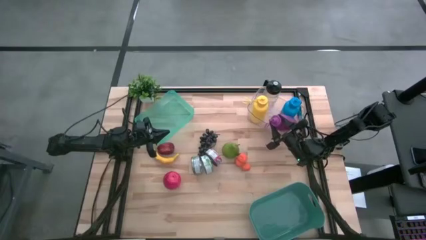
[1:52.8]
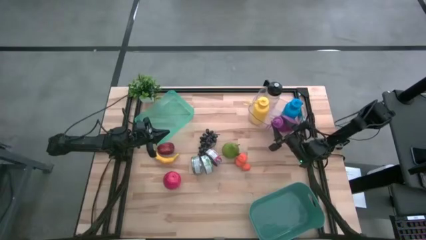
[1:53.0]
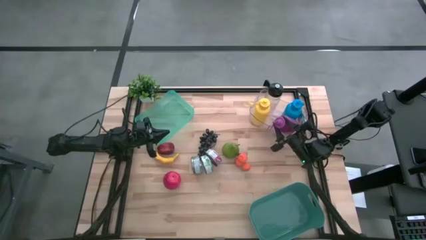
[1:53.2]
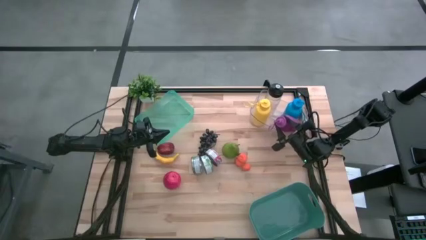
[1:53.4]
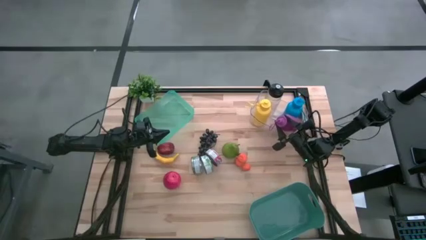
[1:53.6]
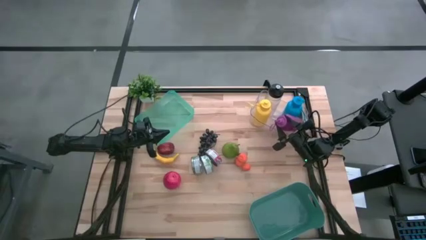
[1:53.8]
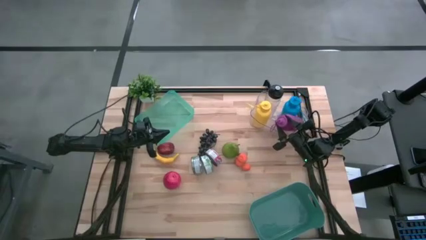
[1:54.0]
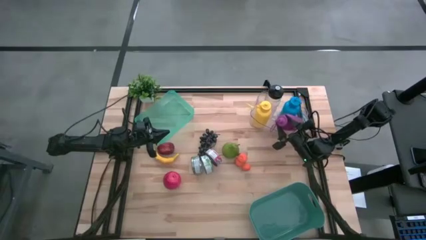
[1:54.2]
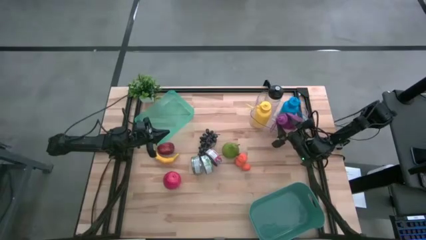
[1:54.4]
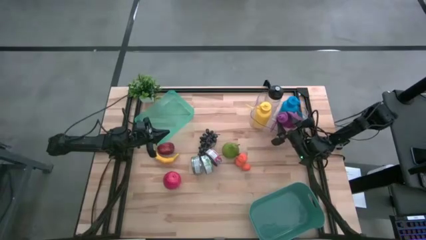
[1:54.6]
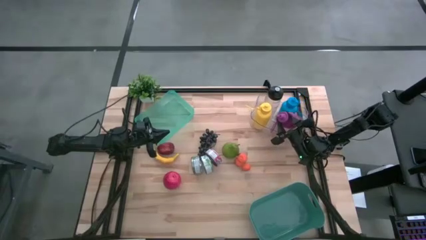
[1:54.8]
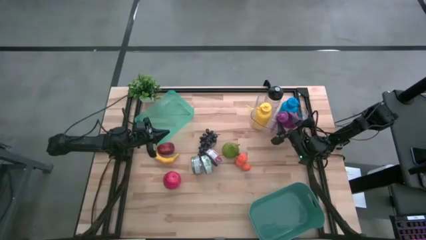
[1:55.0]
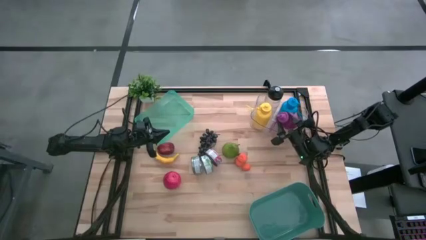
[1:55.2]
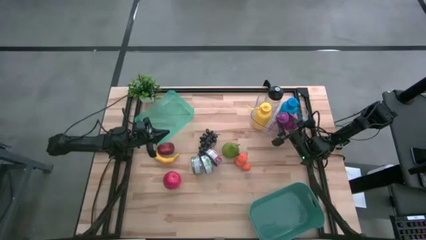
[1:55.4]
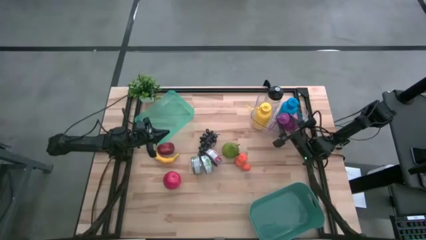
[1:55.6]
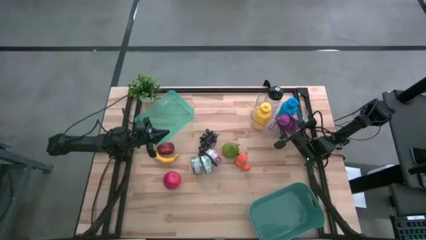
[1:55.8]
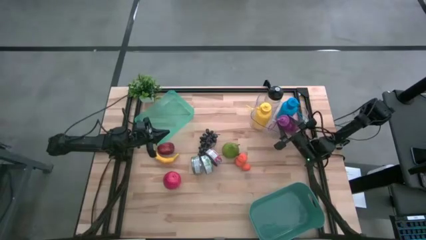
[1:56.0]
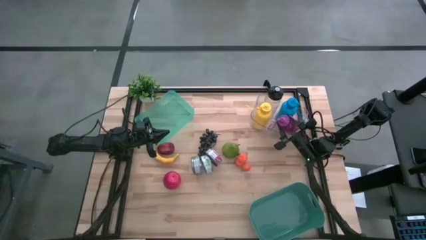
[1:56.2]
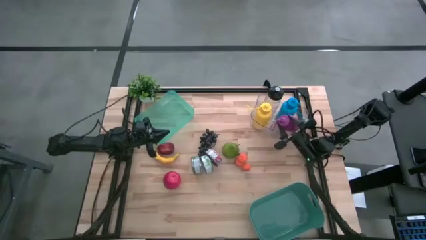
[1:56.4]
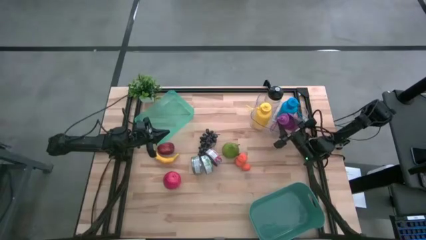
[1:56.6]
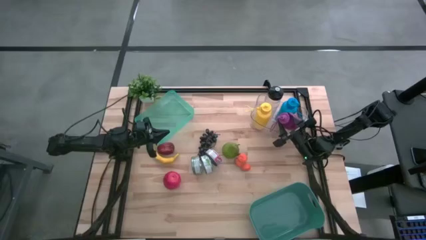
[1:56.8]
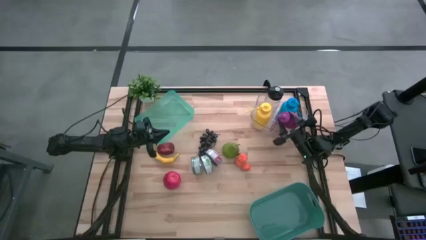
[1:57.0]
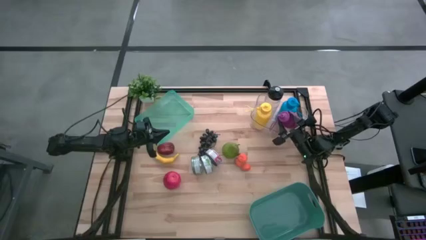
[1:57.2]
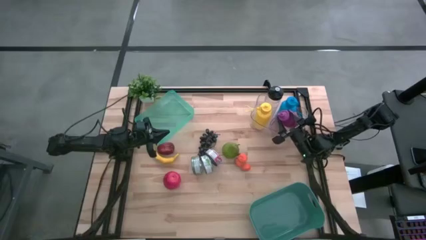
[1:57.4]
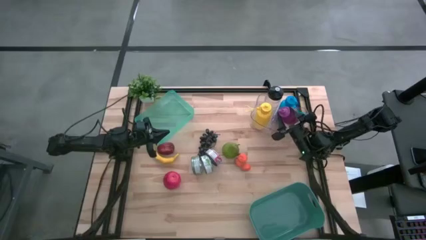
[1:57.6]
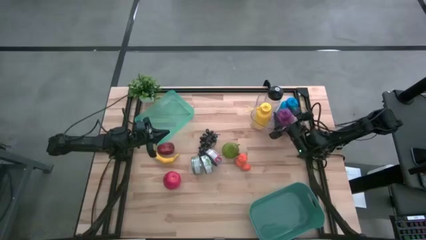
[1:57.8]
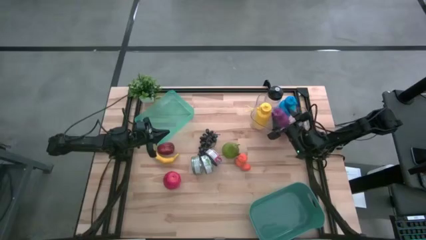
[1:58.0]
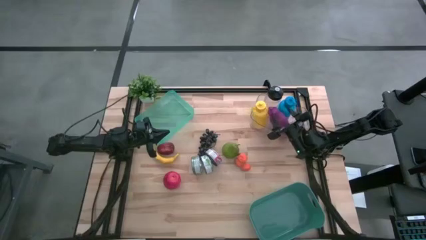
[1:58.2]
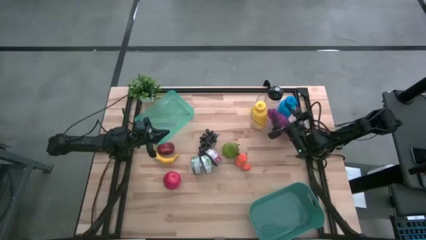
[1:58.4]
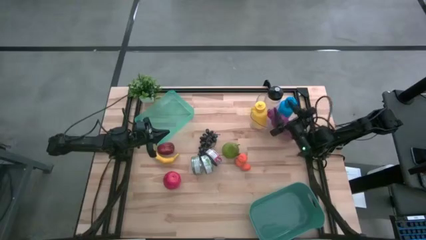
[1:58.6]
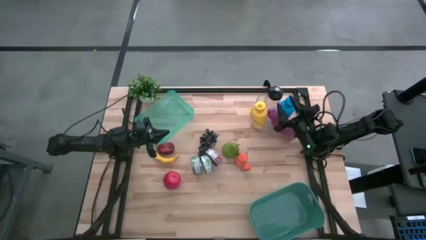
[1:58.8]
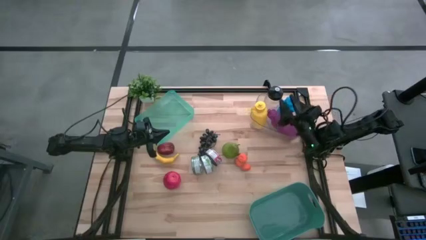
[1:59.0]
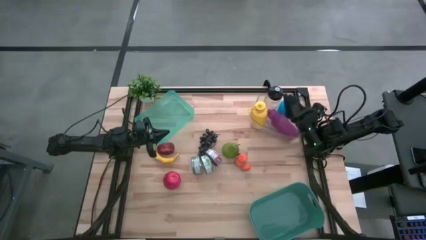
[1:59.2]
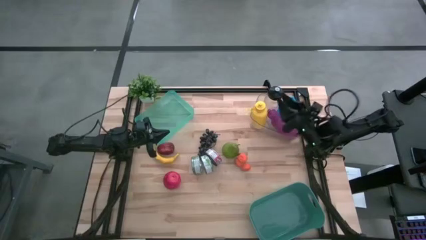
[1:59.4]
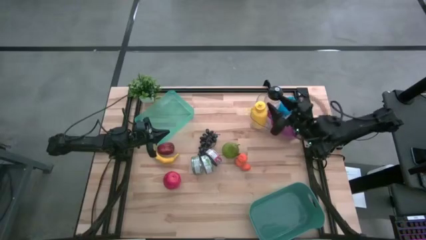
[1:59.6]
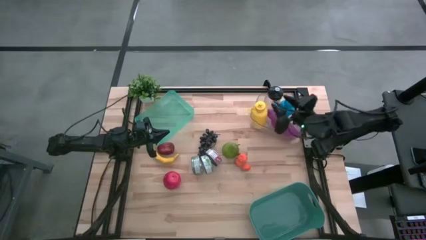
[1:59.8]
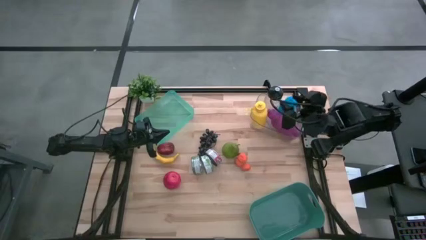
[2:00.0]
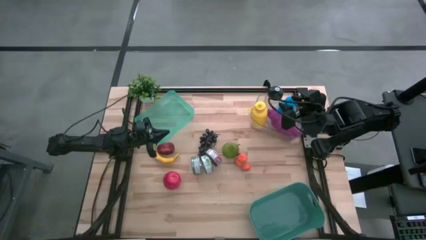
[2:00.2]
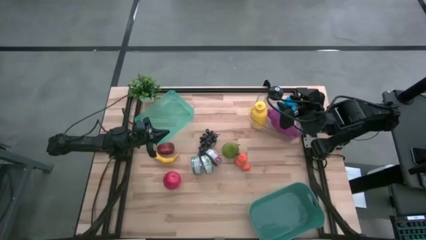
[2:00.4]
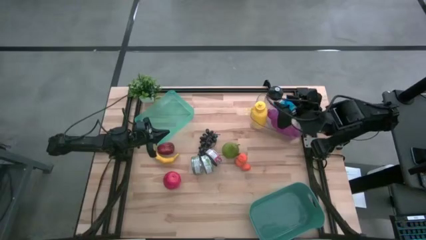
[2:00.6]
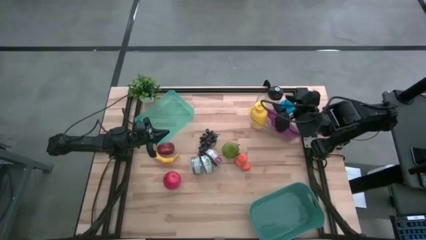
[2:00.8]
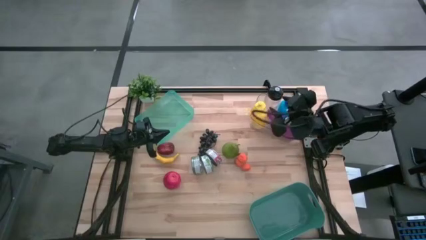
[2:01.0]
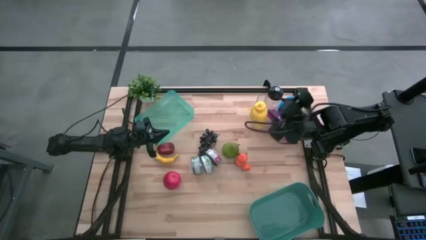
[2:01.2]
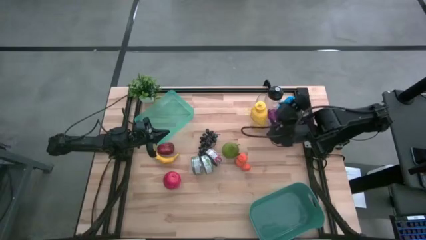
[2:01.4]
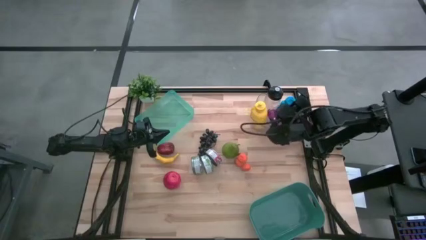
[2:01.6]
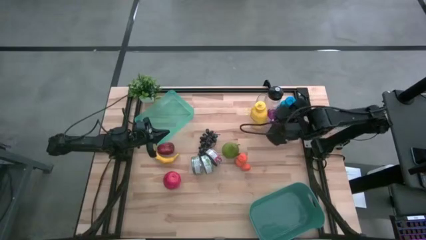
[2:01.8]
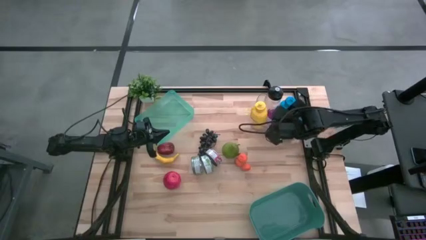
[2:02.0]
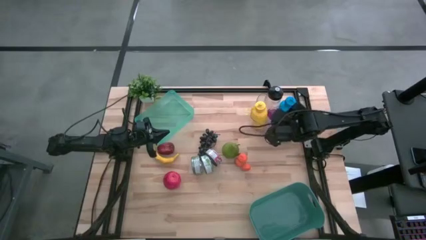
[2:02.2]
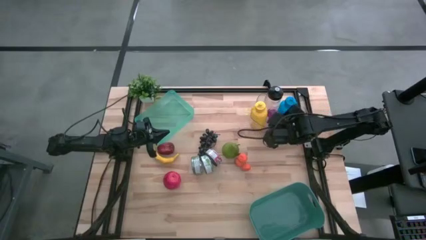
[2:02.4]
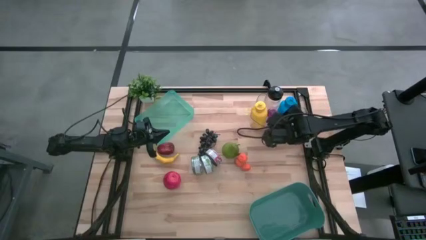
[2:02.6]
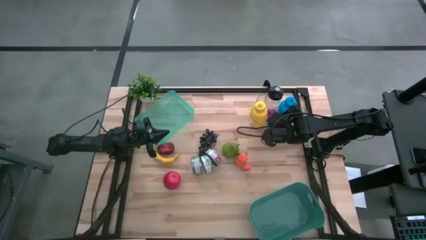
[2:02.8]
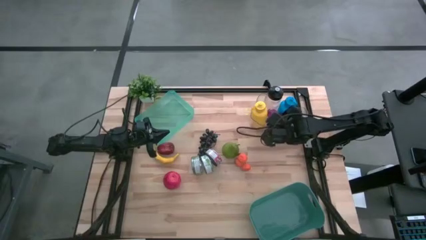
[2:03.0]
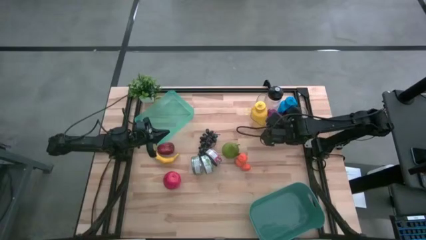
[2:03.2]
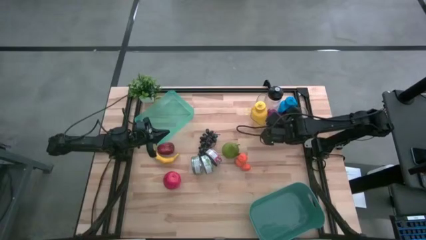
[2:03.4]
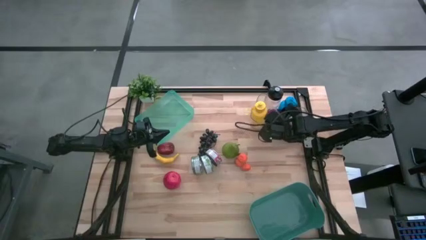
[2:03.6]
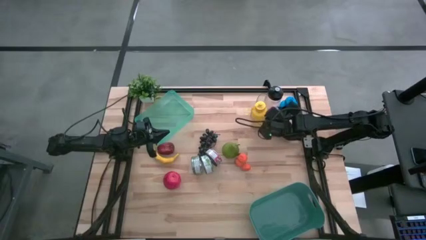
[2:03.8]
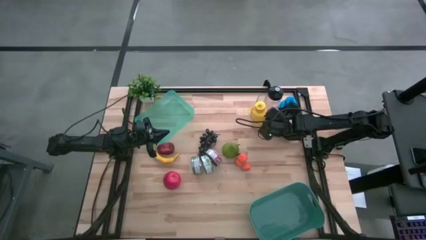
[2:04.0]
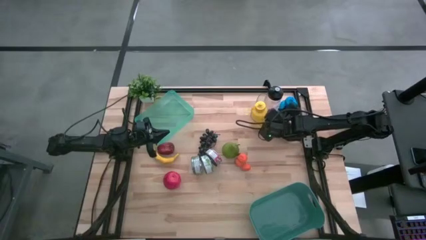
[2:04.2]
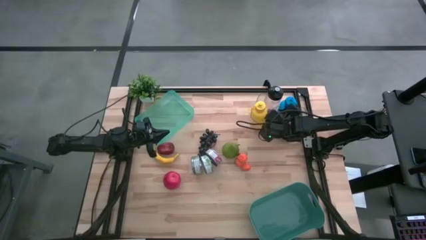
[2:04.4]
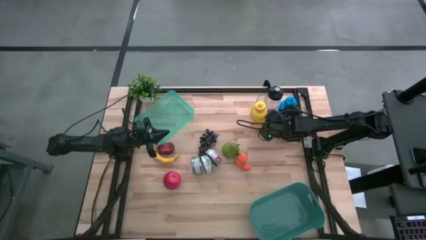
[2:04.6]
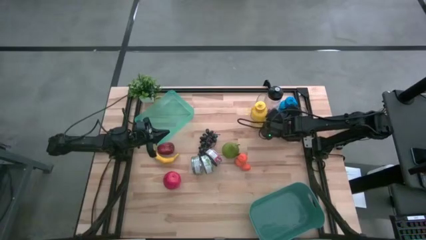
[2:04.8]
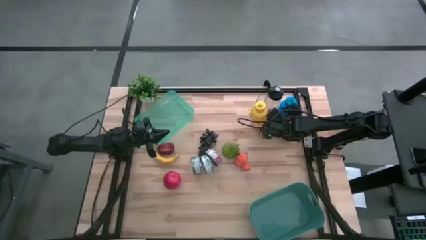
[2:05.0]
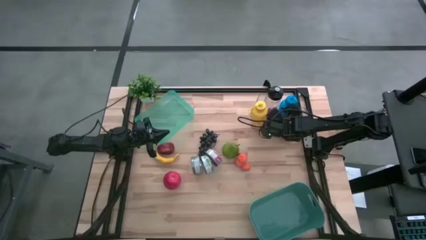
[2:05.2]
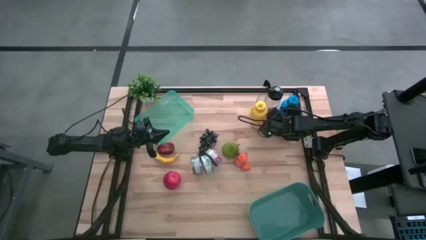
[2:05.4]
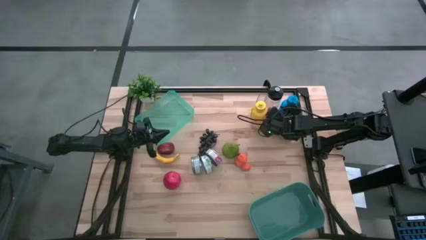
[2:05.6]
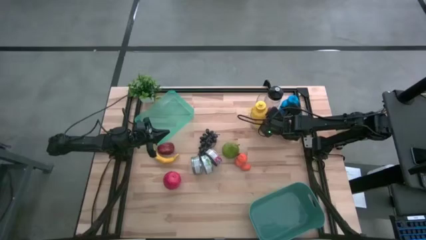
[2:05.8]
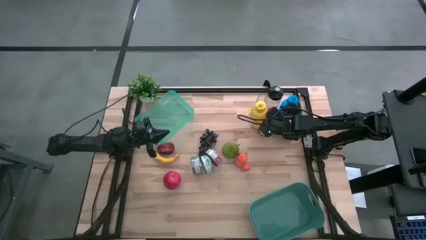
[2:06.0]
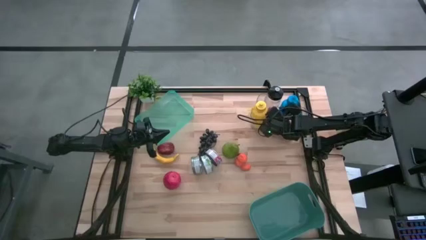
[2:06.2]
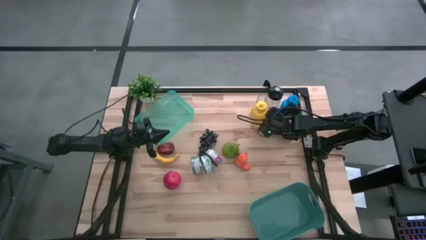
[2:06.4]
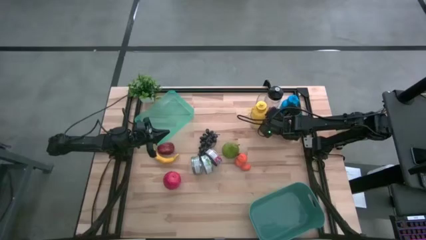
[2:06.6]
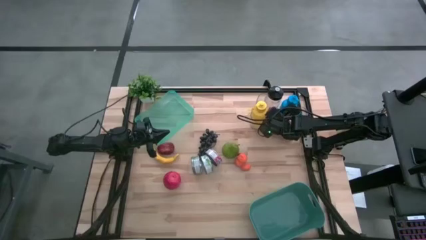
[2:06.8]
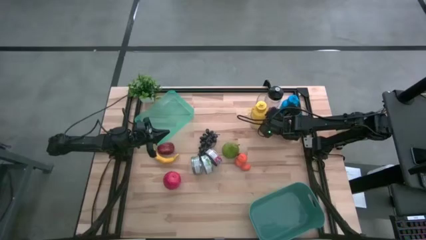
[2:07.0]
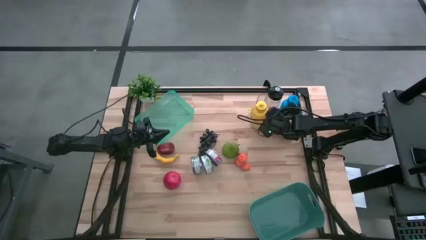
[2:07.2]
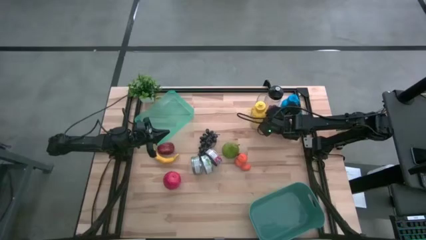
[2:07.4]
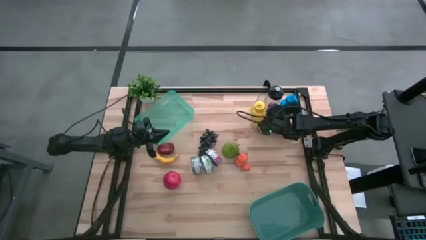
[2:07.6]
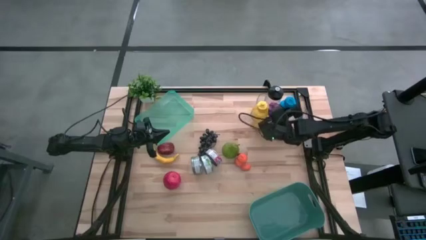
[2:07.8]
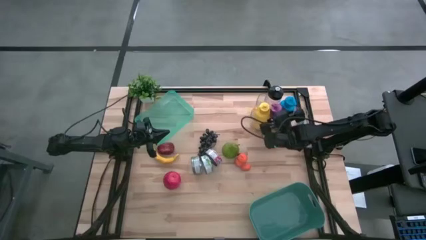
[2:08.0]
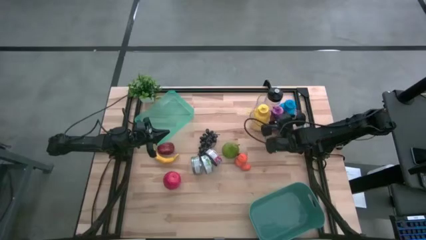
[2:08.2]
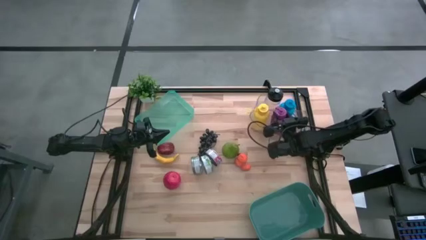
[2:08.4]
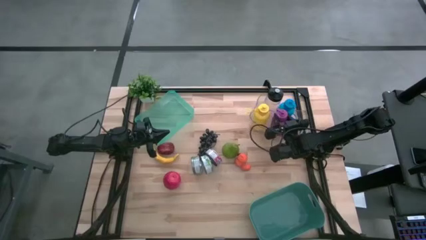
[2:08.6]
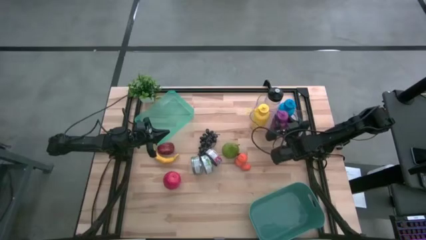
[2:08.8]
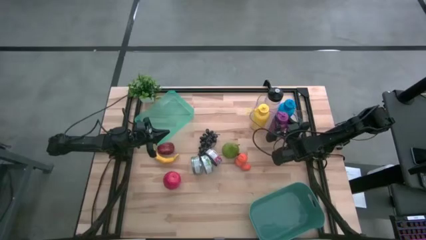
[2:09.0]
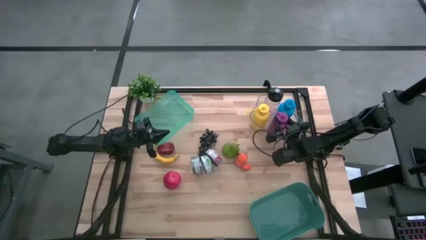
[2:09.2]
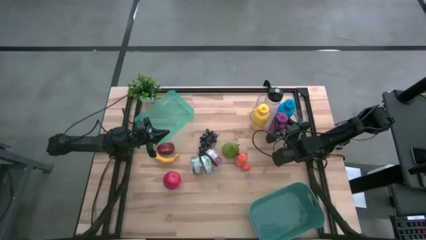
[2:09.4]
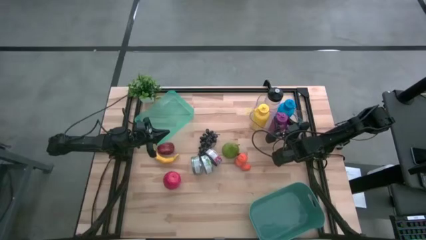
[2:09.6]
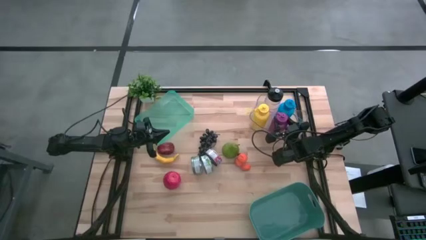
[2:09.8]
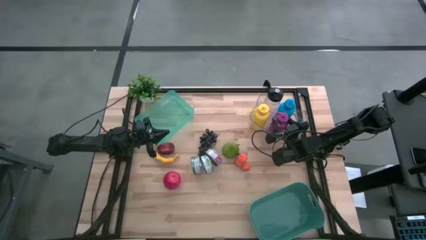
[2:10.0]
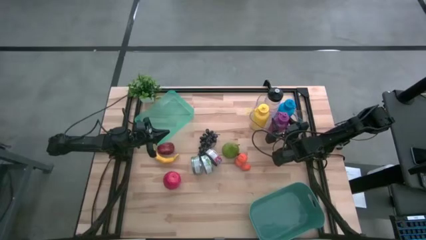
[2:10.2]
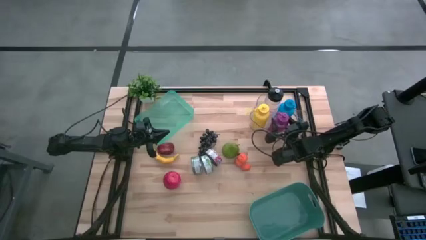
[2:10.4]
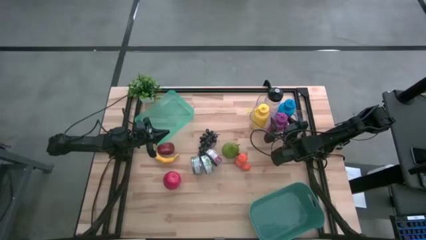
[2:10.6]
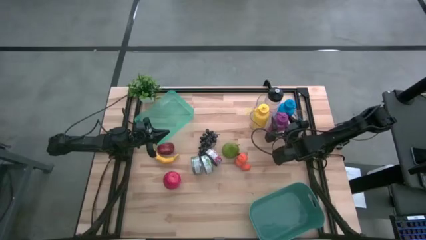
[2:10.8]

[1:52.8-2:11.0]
Task: Pick & Place Food Item
Put the pink water bottle into the transparent bin
